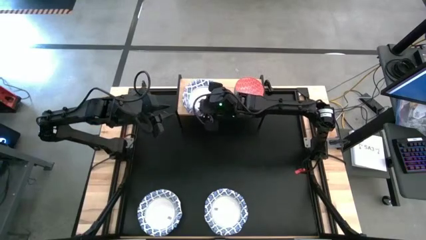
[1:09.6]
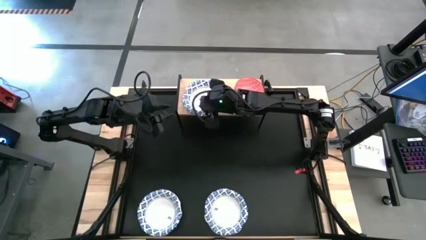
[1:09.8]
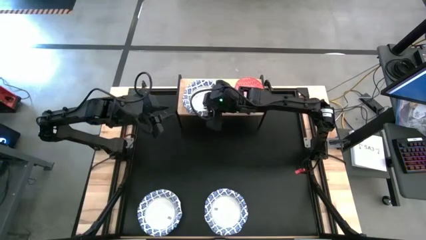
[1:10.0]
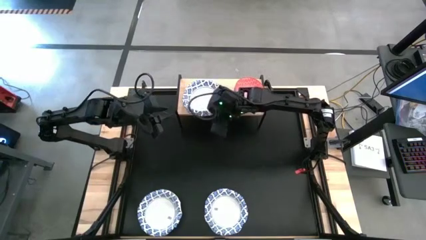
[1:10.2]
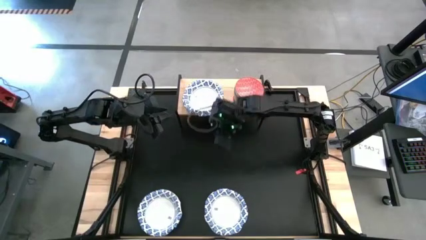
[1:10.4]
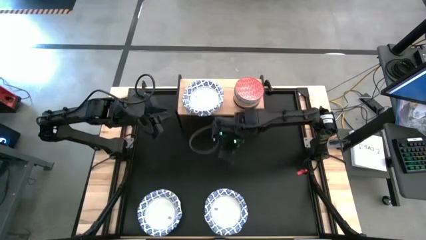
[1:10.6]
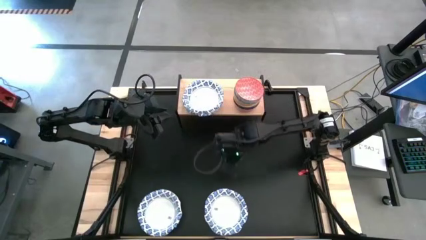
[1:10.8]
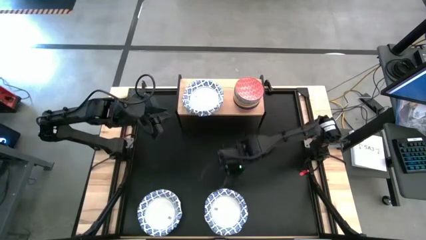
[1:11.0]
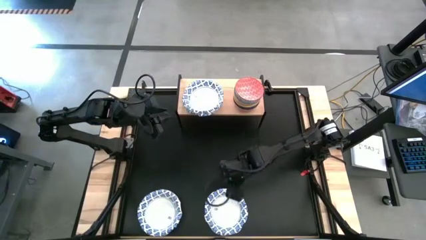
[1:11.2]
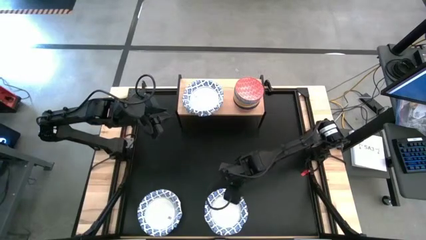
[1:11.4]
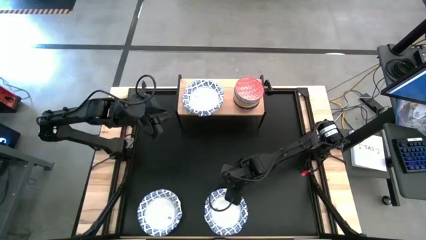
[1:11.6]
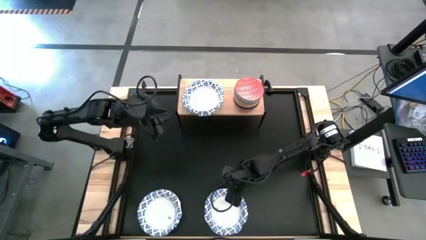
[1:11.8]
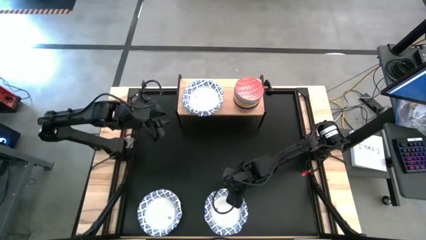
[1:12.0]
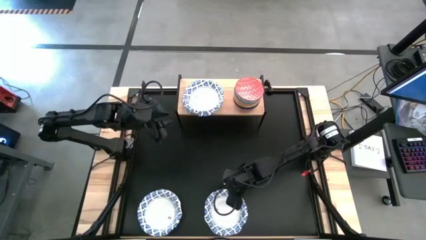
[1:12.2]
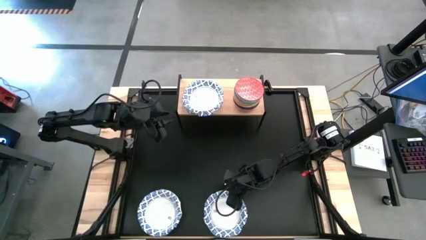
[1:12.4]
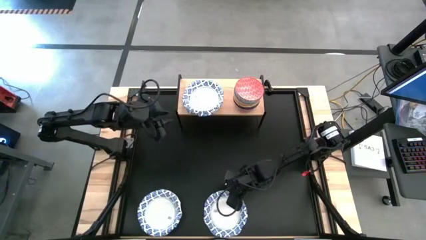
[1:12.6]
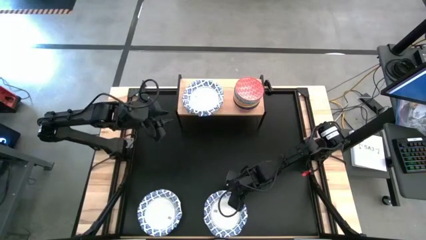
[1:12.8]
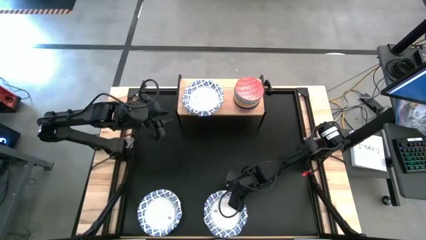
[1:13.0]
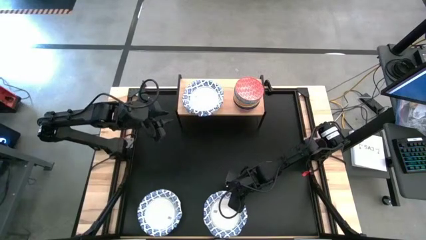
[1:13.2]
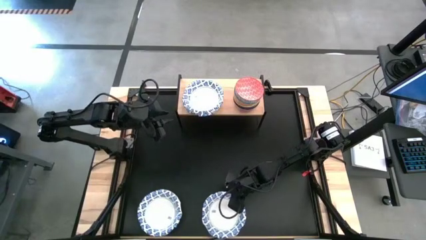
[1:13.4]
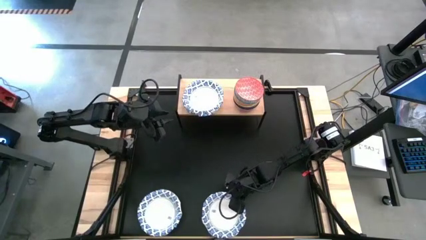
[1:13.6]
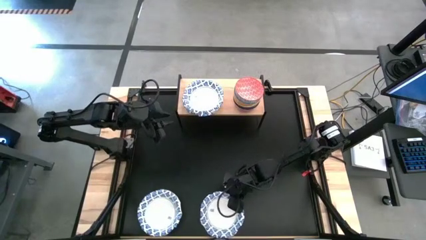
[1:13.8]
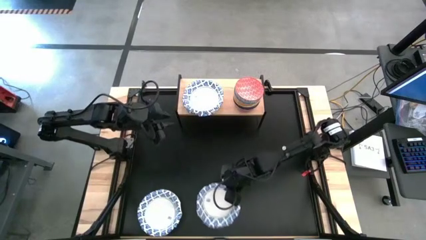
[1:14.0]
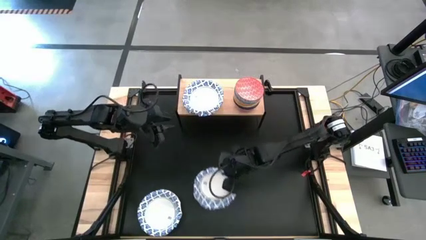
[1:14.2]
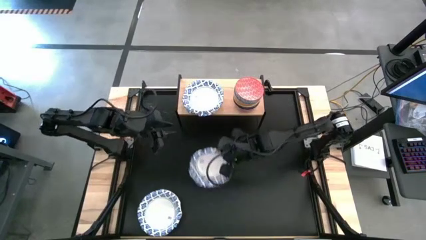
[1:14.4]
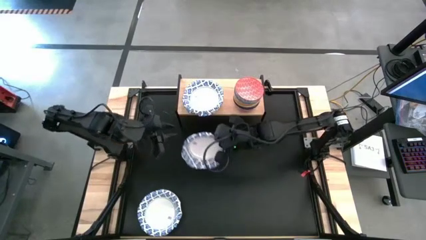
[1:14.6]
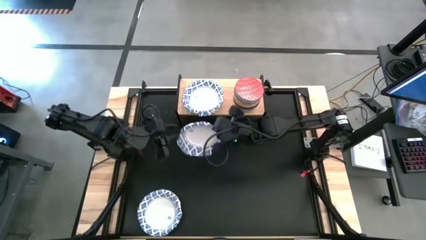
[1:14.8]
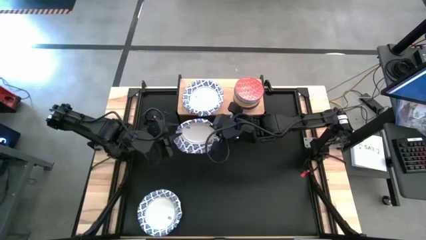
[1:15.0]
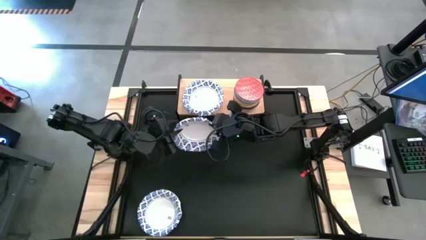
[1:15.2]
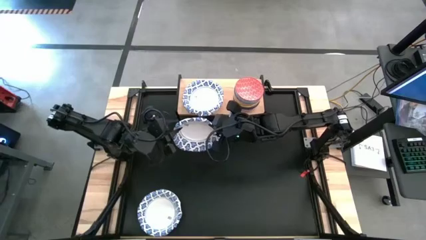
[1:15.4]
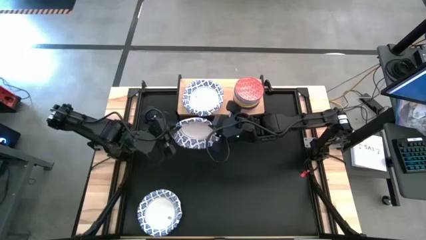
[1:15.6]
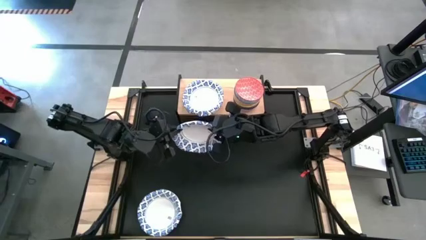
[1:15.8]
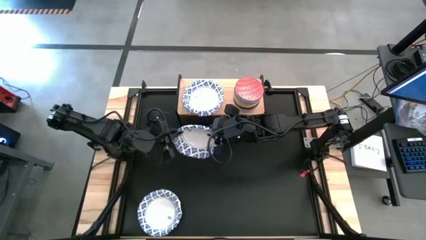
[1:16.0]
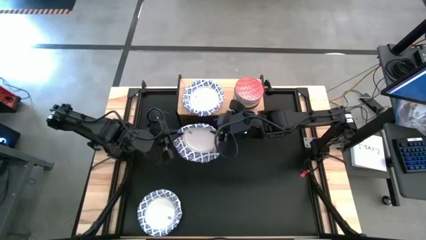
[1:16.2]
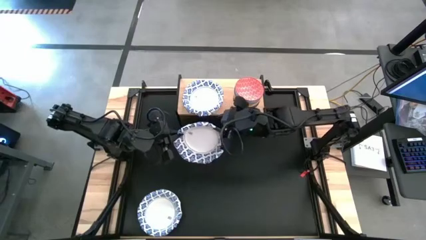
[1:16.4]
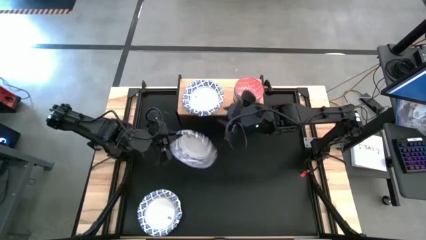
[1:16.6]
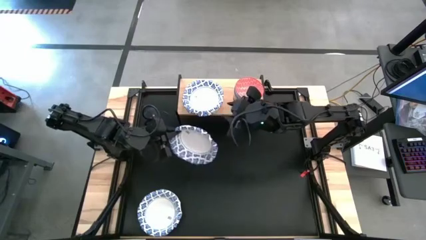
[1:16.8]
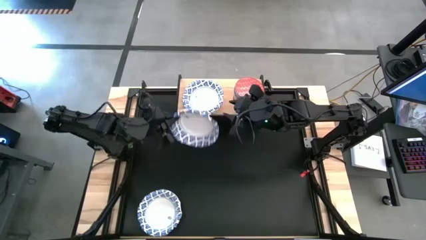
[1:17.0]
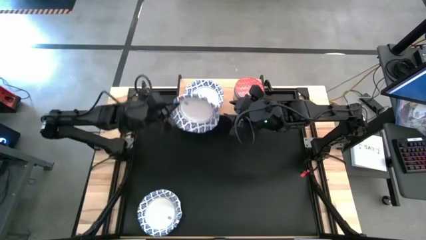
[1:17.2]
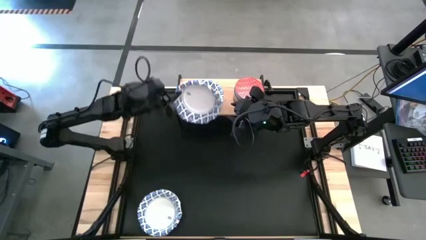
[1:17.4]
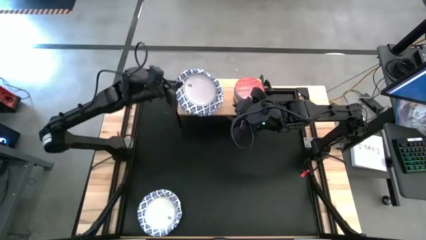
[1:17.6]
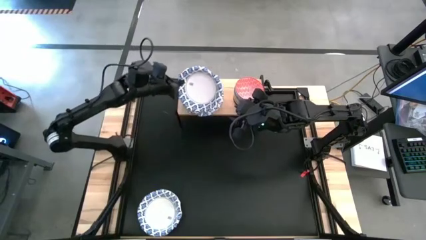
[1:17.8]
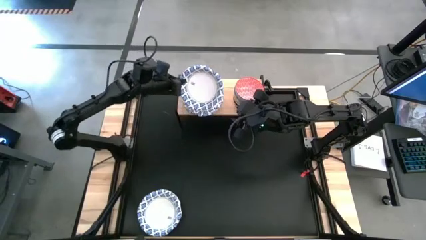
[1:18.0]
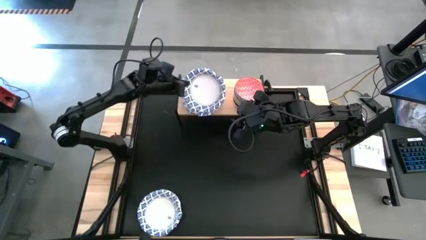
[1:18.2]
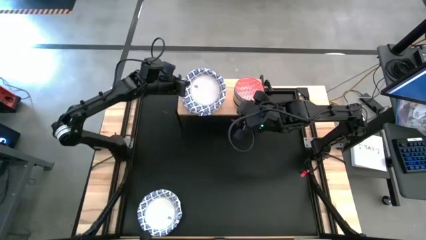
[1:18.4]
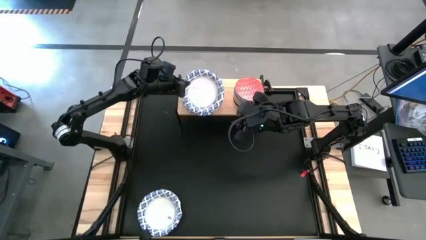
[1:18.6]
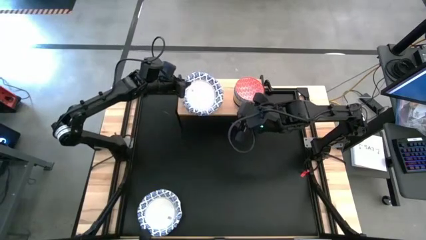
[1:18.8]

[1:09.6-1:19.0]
Task: Place and stack bowls onto a shelf
Stack the blue bowl on top of the stacked bowls on the shelf

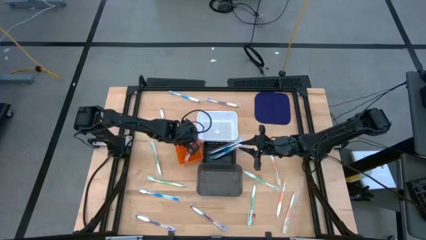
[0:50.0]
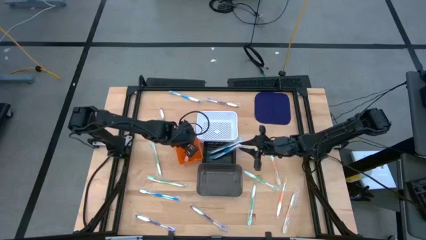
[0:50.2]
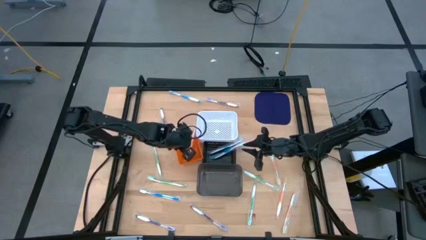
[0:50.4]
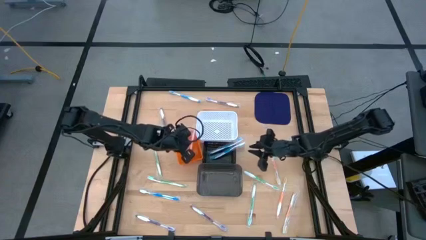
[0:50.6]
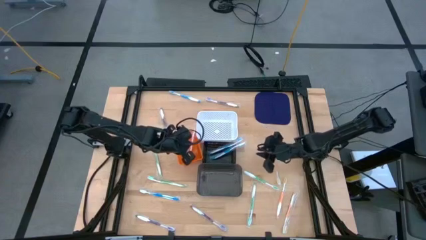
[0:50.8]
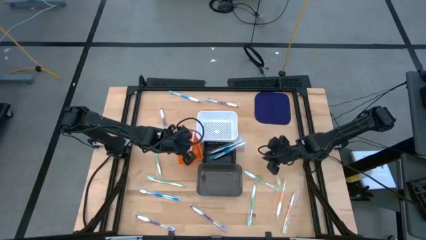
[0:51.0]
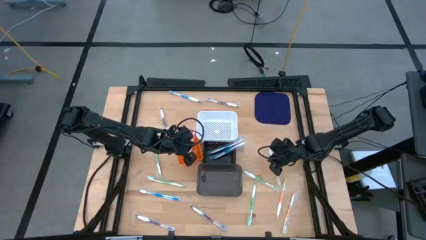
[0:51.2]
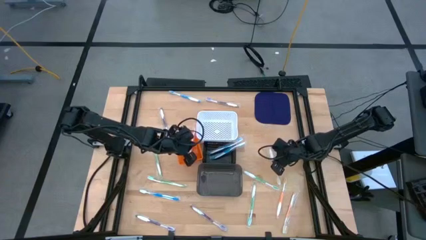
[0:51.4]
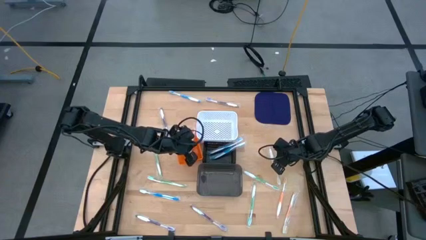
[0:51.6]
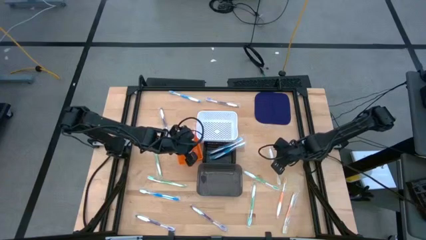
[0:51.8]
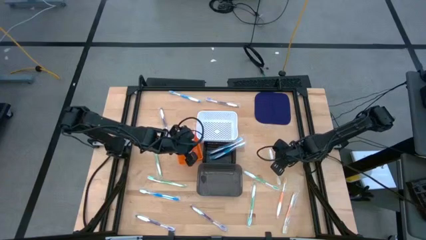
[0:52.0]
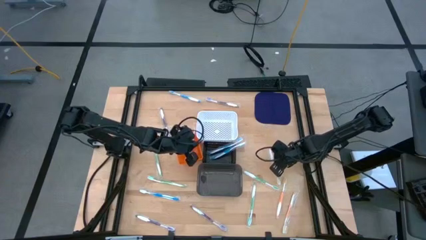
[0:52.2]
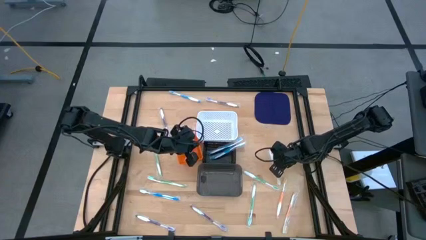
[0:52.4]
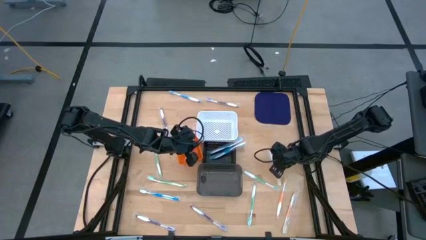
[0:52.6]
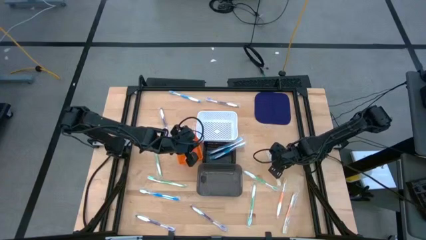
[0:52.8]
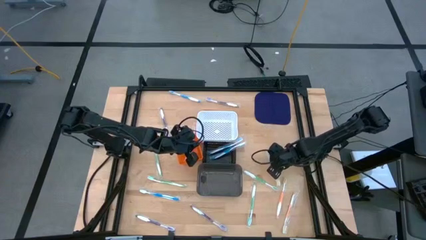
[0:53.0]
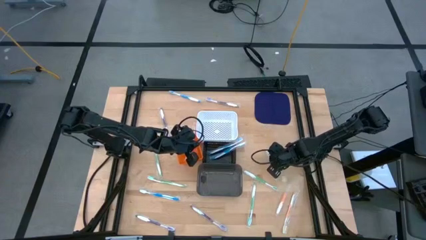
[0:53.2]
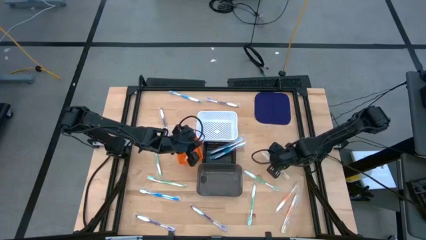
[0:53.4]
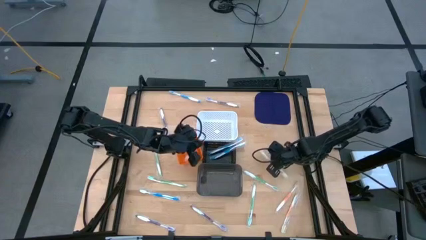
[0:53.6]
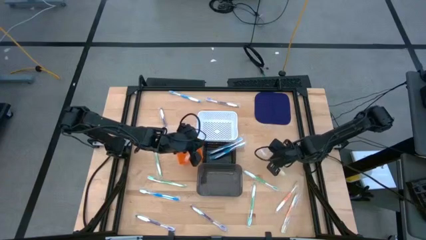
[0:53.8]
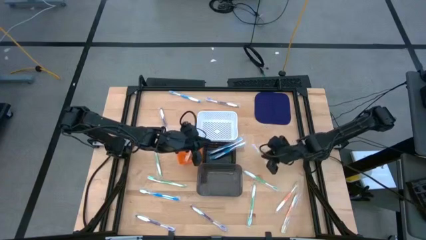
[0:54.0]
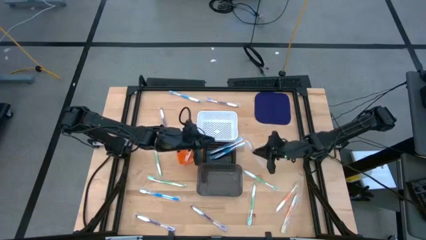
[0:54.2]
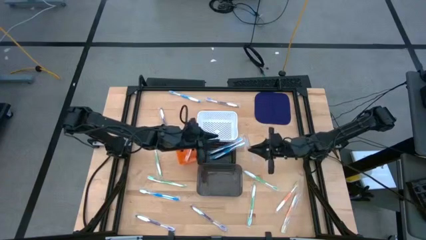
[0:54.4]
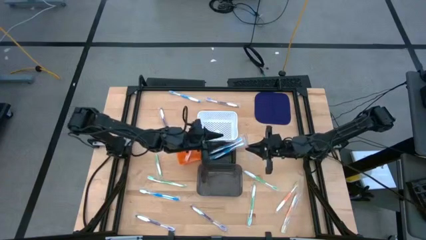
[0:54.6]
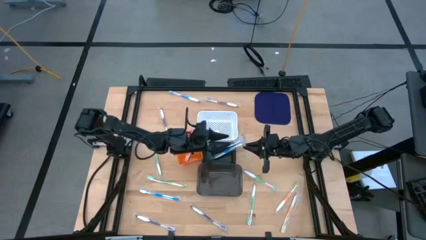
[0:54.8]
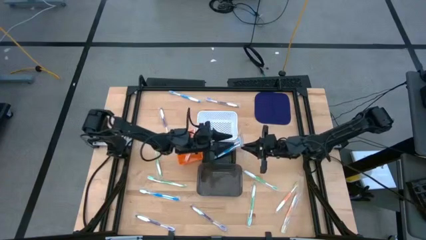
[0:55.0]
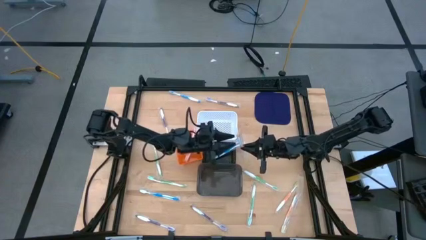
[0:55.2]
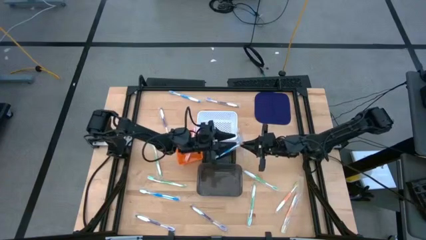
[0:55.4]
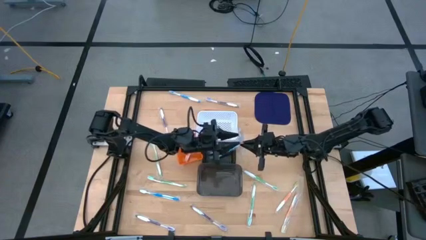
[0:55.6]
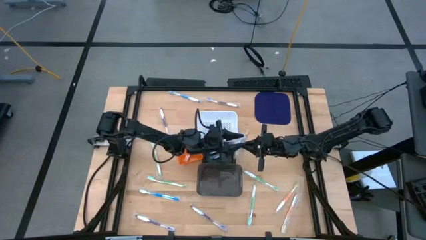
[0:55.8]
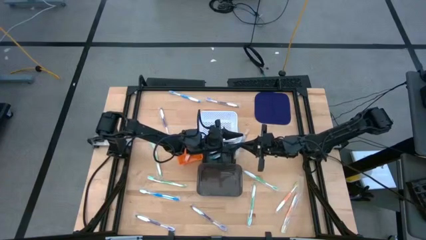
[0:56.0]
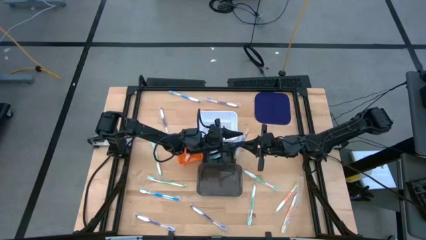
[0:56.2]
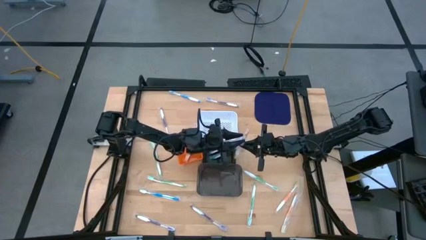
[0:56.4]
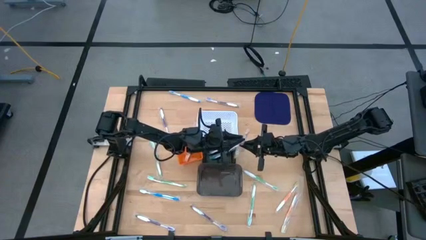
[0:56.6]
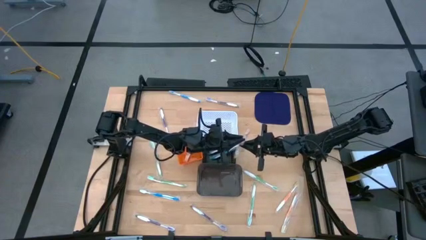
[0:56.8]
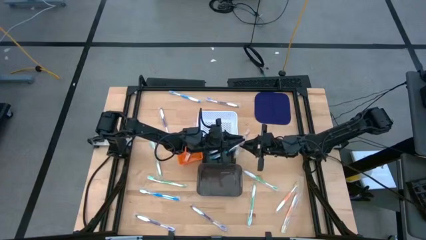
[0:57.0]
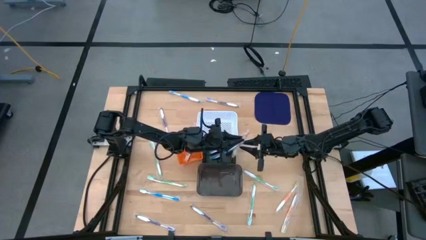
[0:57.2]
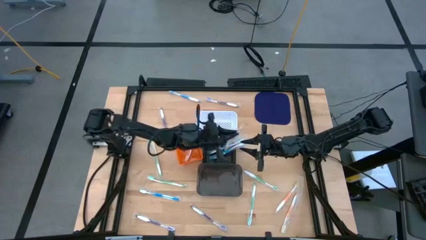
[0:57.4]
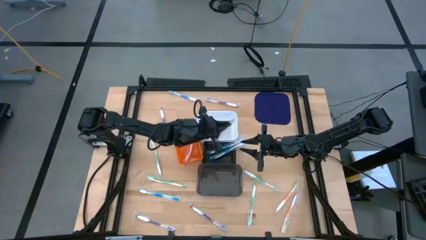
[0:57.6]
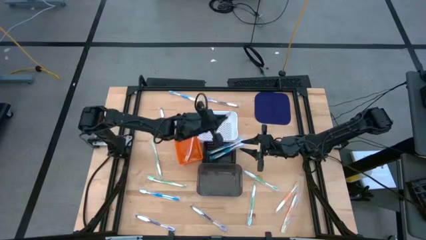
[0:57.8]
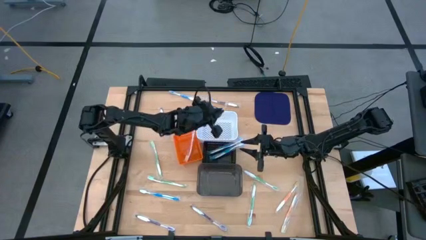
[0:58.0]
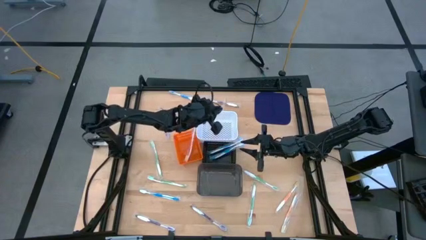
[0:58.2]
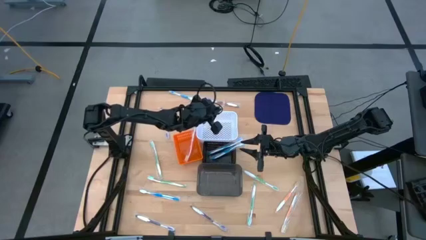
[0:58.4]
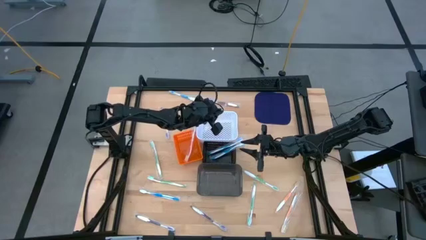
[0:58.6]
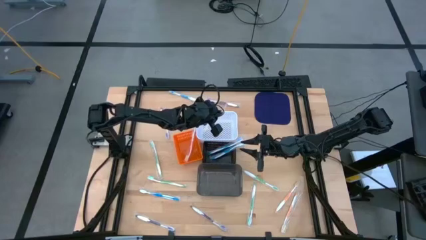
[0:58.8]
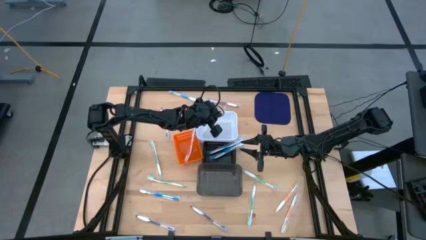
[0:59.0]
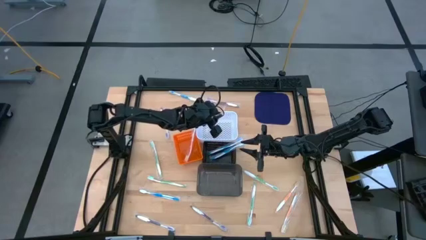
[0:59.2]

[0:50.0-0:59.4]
Task: Pick & Place Toothbrushes
Put the top orange toothbrush into the white basket
